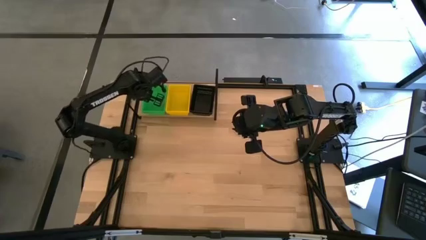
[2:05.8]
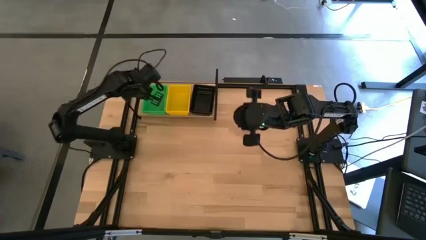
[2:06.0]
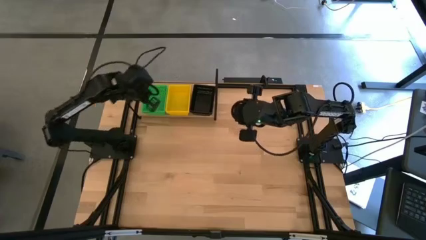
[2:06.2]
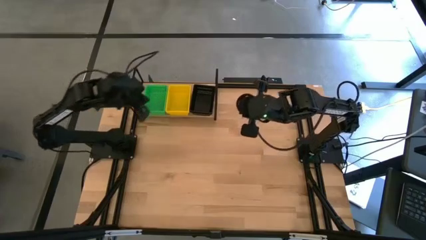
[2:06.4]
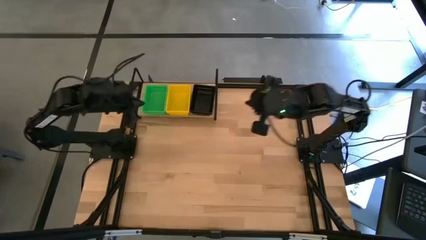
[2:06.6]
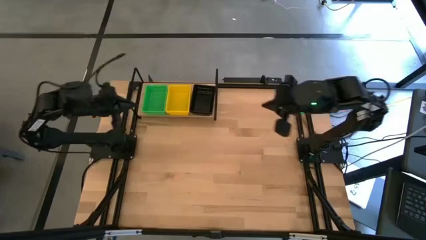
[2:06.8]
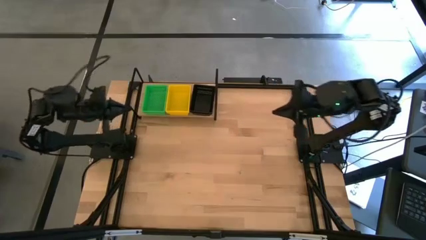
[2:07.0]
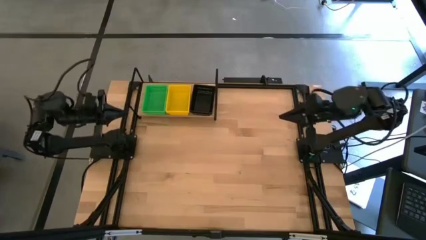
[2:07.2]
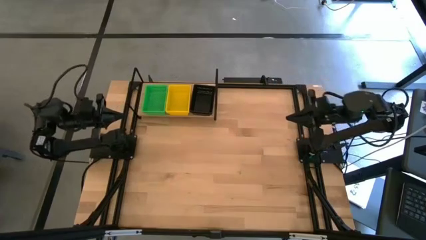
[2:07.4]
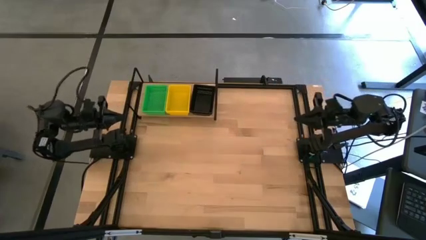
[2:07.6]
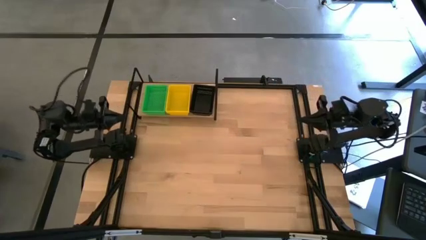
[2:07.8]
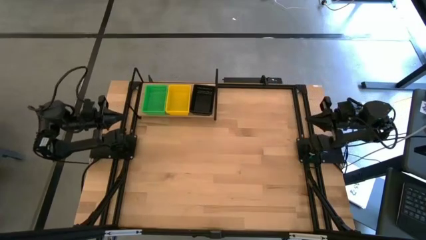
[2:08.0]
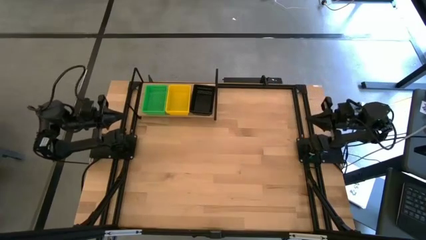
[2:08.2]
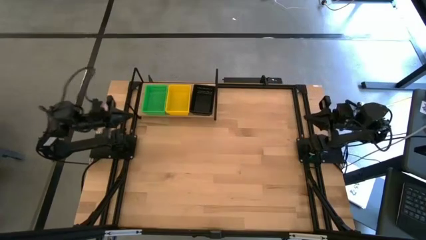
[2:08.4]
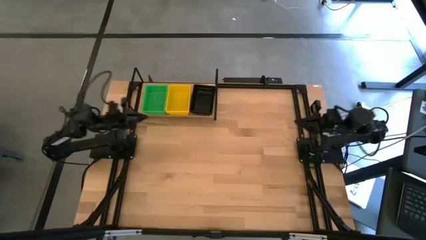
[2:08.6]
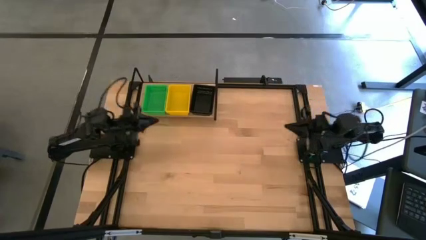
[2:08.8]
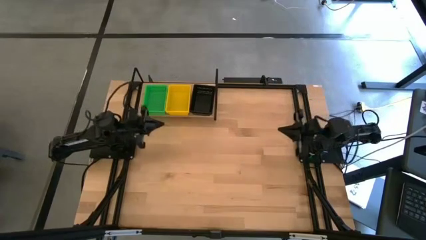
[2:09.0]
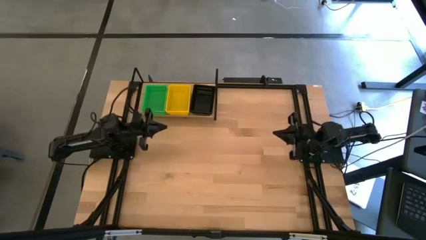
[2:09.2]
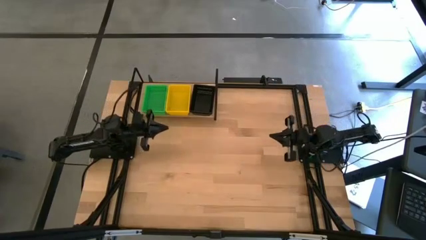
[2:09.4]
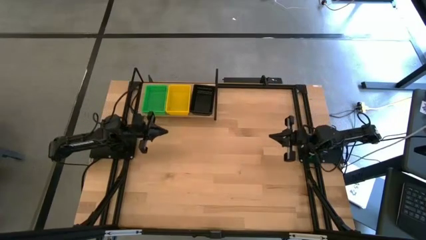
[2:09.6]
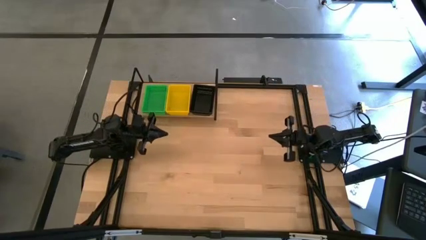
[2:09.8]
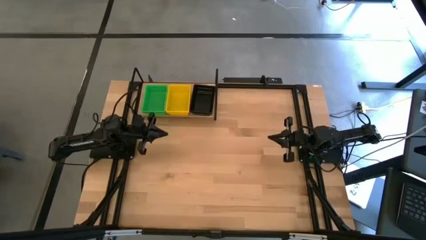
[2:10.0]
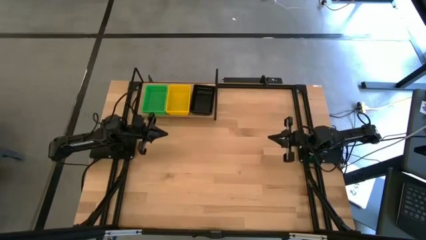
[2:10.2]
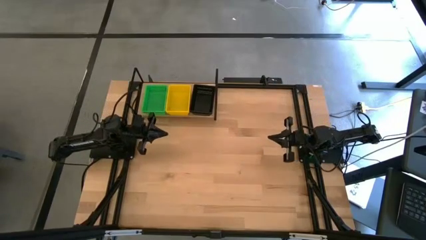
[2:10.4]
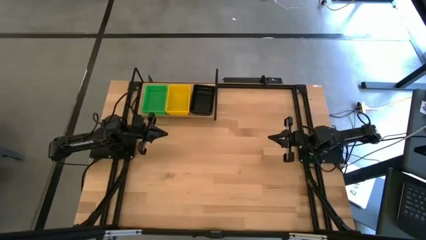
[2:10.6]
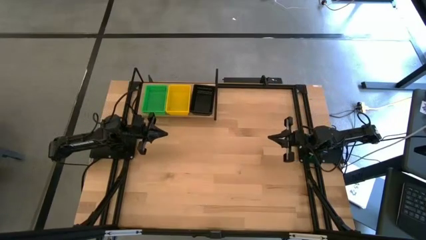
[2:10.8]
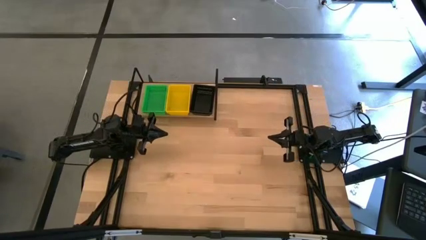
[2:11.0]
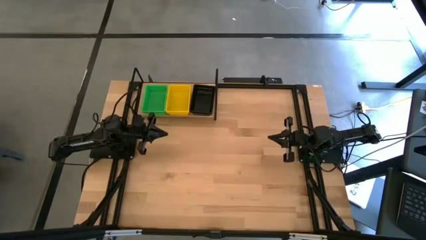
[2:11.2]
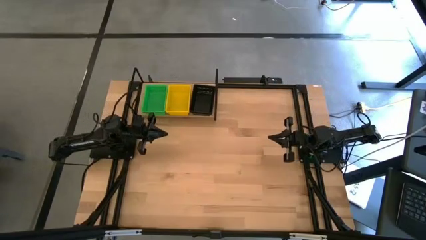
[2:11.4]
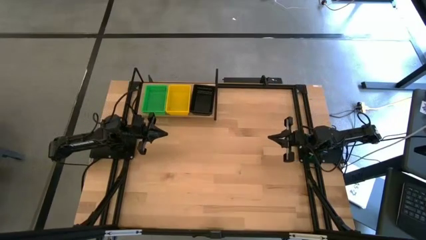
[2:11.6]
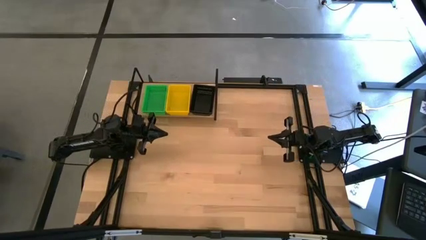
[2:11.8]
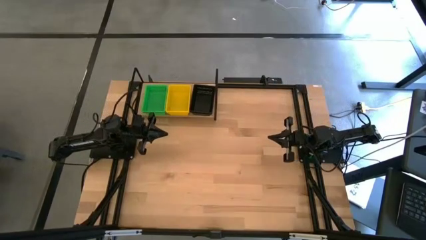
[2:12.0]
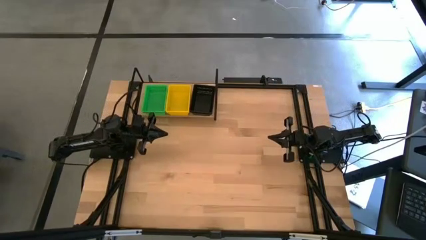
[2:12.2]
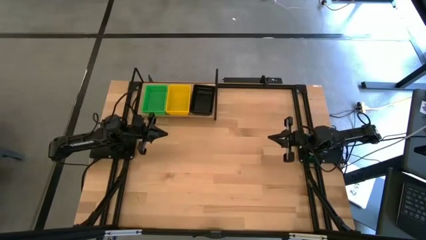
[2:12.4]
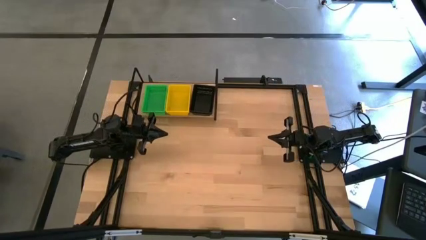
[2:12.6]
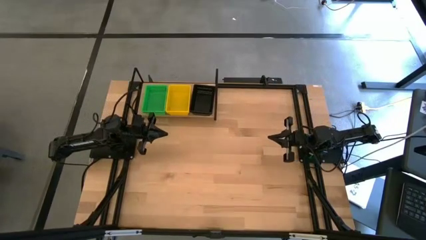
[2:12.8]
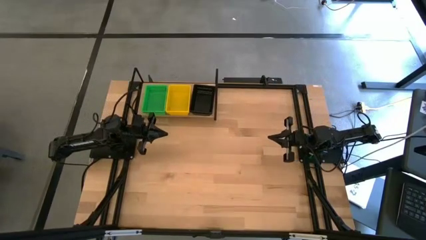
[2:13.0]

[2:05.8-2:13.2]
Task: Stack baskets on shelf by color
Return to Home Position

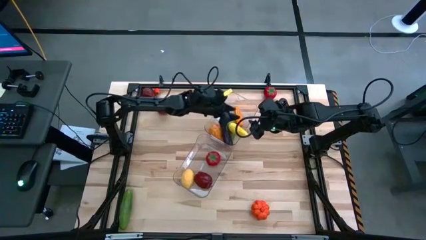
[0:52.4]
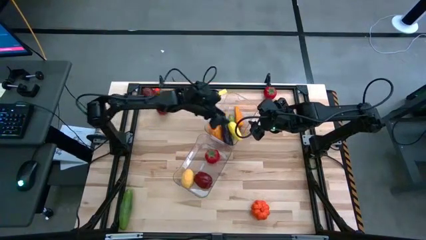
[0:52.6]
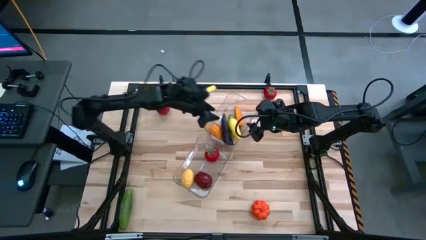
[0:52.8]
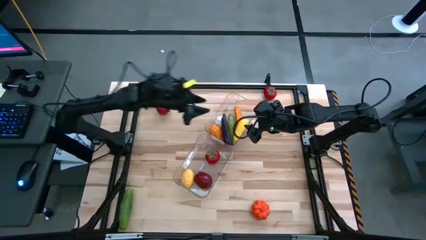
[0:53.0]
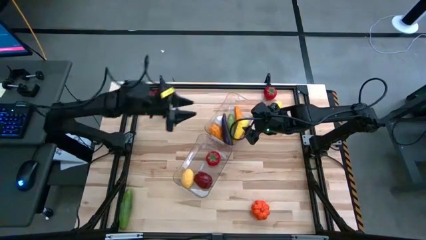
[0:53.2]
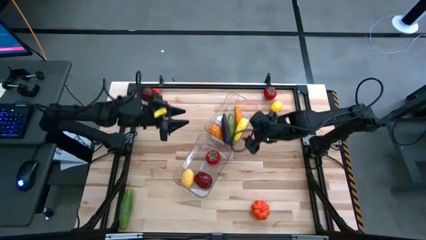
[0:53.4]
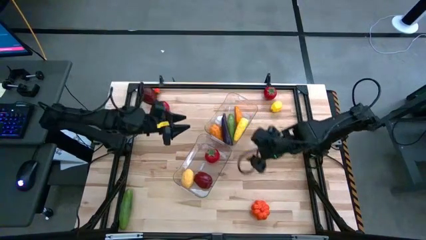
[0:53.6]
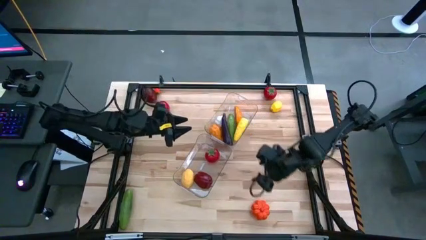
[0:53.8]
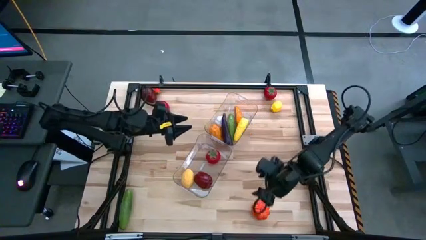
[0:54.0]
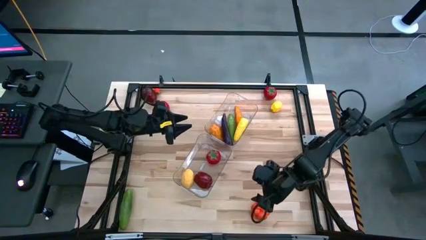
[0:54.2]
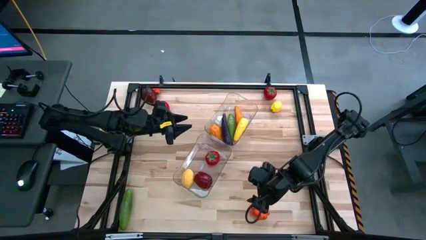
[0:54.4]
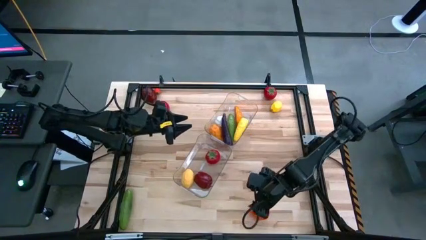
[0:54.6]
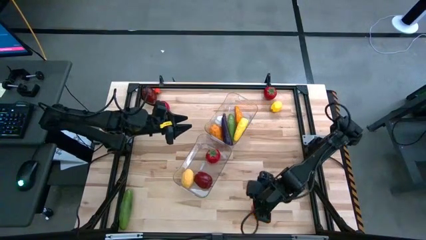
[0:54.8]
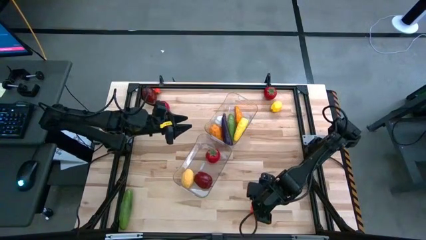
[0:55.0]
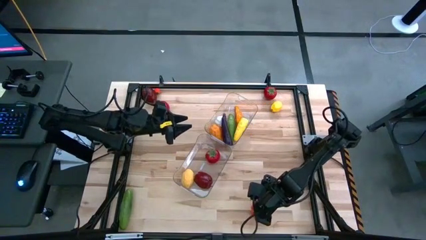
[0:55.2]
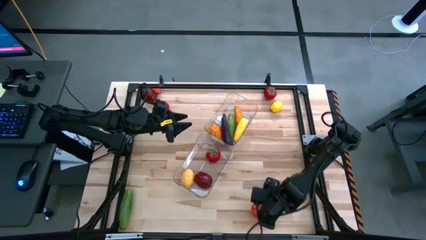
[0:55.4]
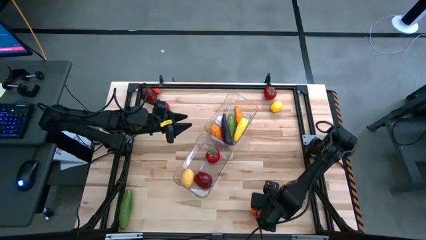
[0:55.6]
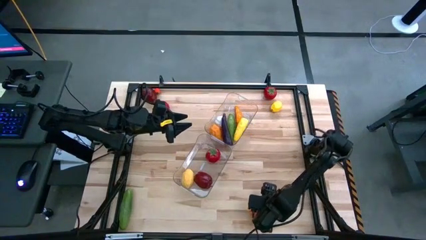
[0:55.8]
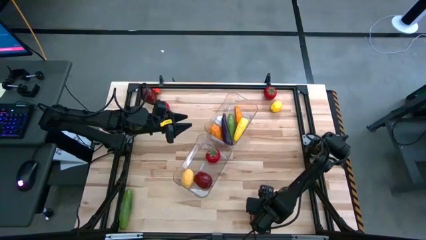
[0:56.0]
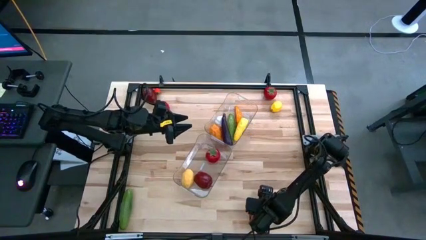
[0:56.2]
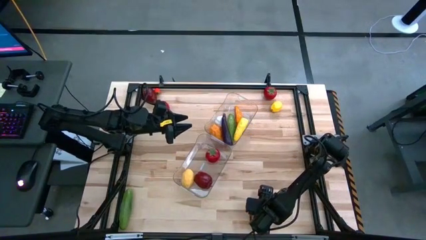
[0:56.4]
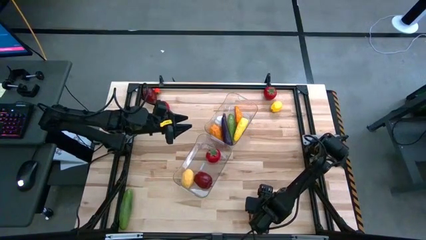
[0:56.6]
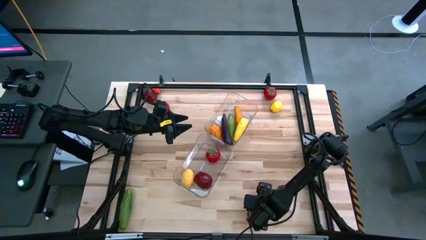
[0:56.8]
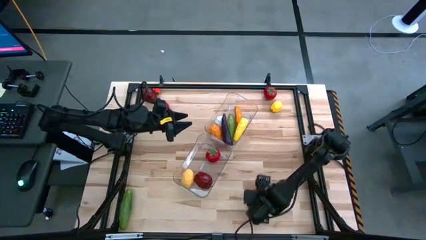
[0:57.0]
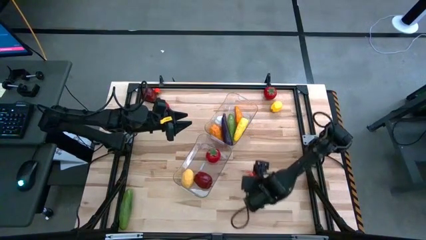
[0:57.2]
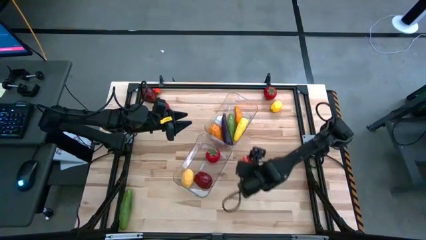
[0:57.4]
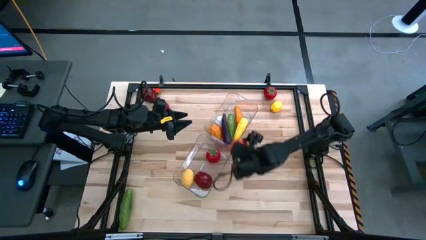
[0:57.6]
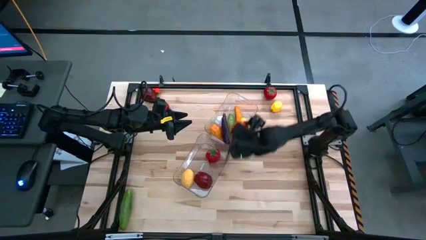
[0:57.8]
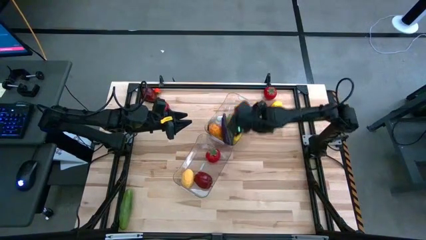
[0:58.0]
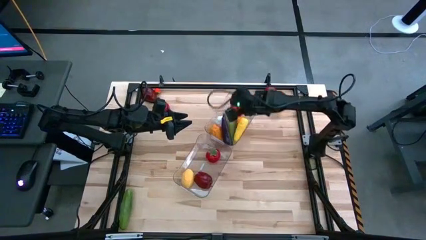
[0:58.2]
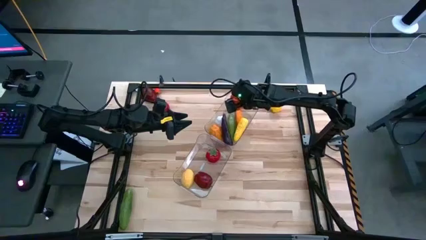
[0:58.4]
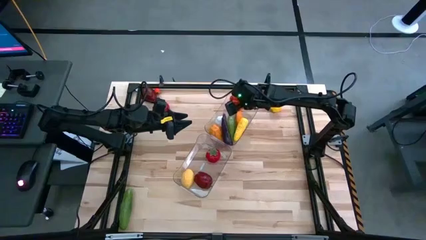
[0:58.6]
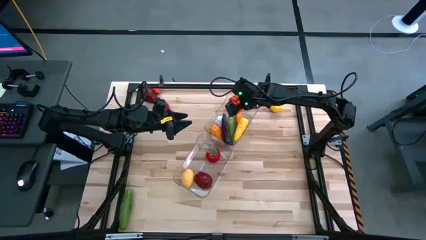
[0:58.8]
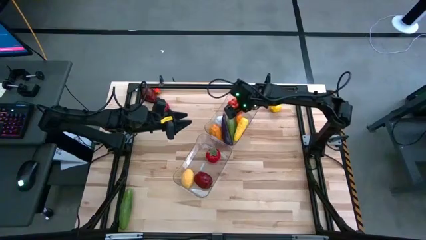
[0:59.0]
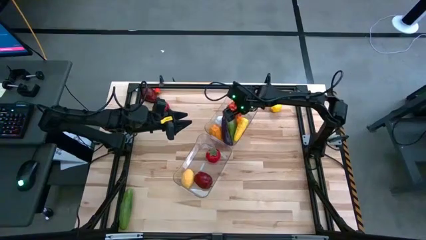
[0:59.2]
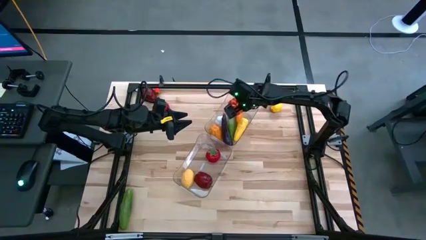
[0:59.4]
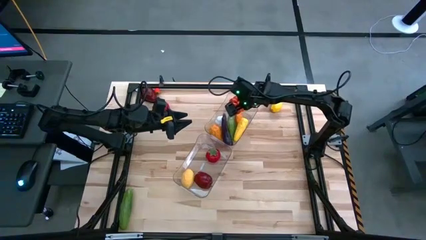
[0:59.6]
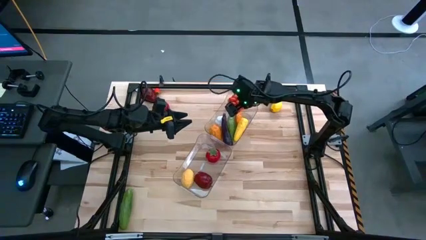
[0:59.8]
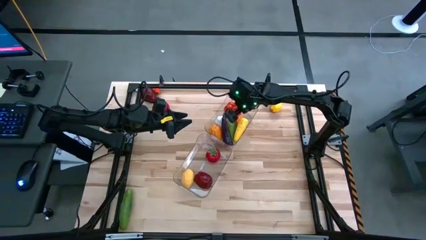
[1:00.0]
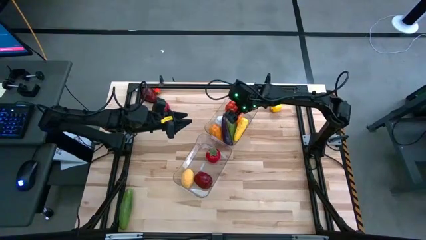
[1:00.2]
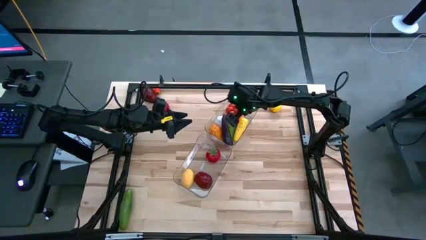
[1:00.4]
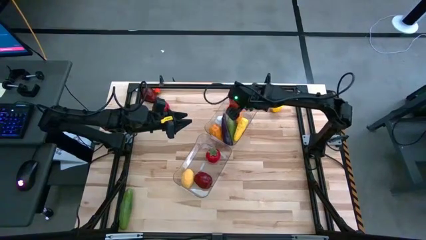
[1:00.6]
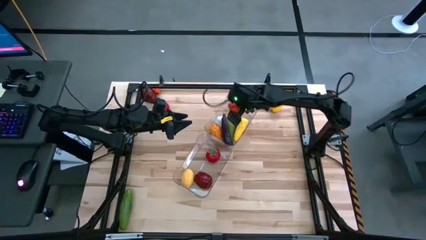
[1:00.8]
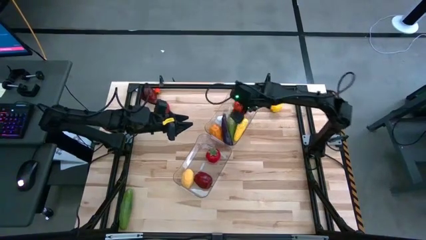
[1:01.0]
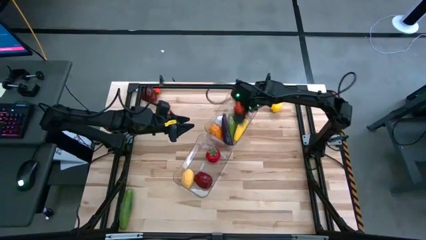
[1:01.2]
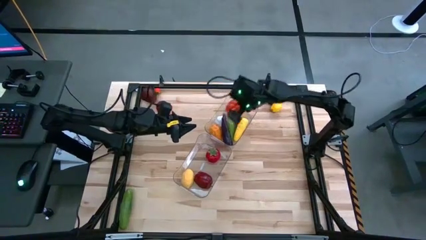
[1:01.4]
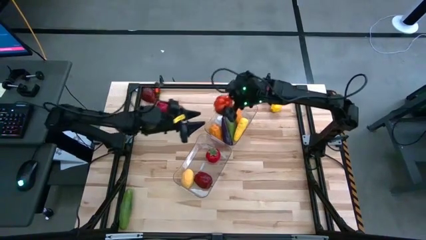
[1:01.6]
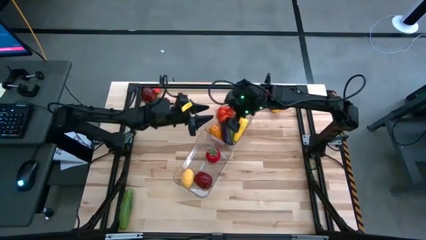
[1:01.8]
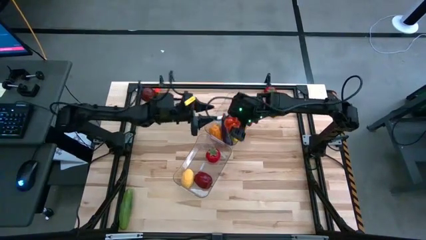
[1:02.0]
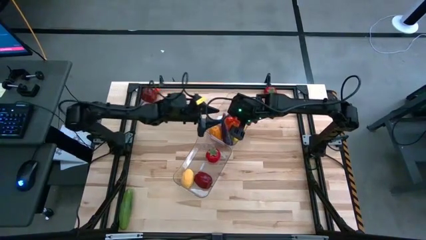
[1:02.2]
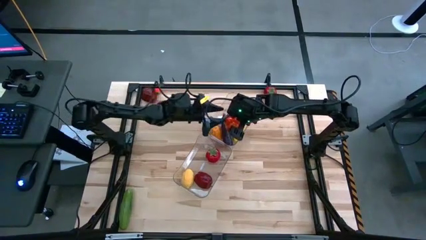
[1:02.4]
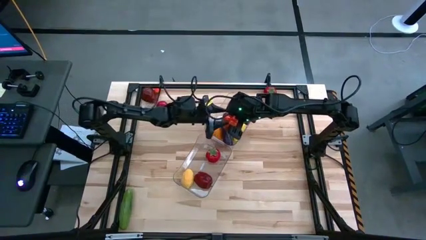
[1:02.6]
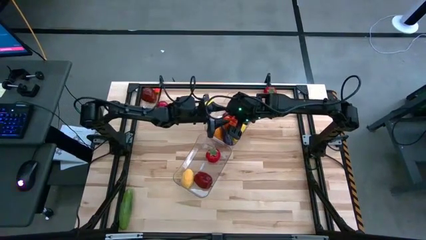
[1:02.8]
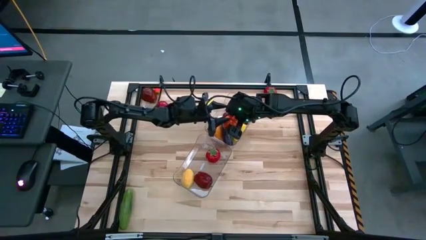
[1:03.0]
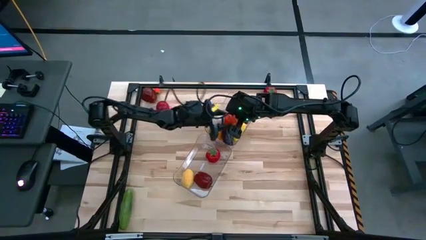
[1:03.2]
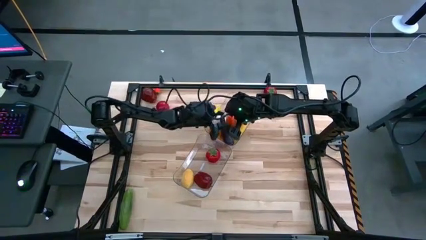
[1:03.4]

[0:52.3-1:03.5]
Task: Sort produce into baskets
Put the orange pumpkin into the top transparent bin
